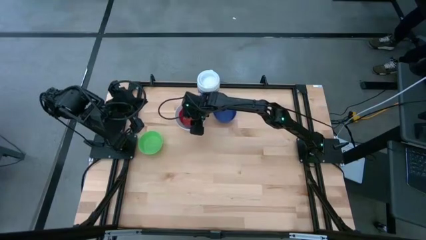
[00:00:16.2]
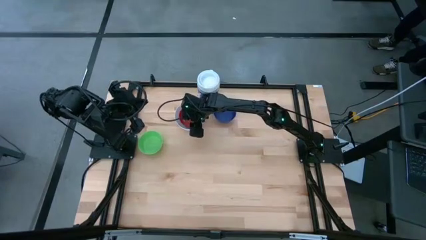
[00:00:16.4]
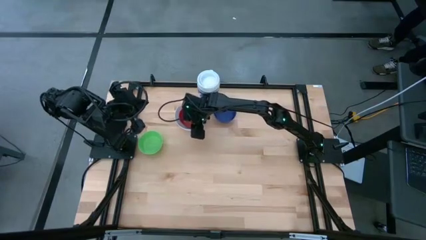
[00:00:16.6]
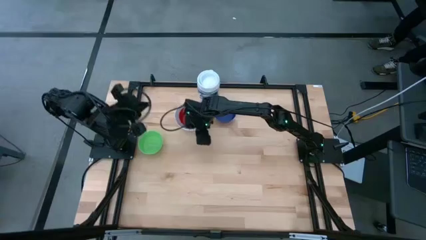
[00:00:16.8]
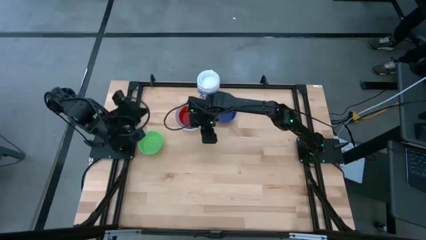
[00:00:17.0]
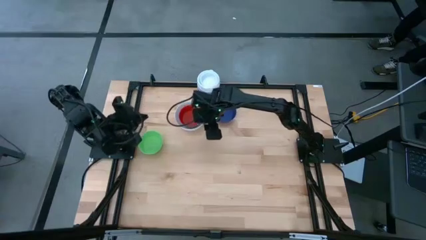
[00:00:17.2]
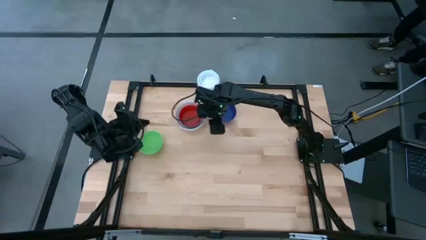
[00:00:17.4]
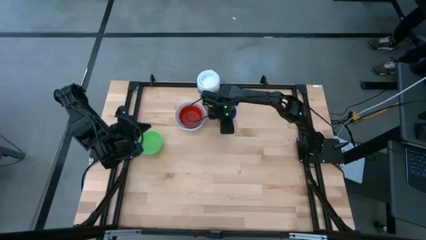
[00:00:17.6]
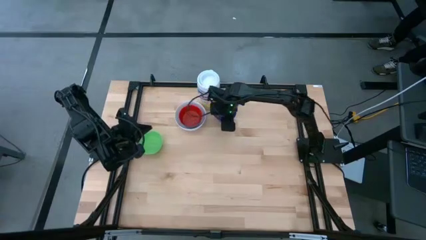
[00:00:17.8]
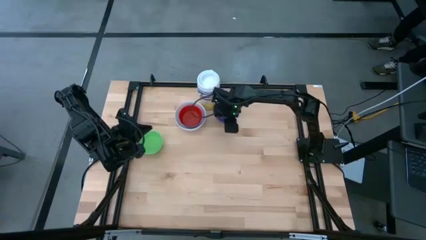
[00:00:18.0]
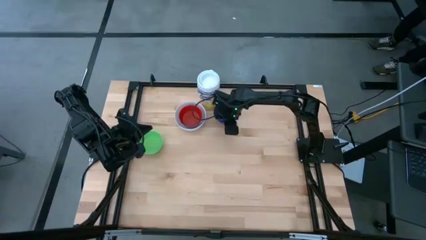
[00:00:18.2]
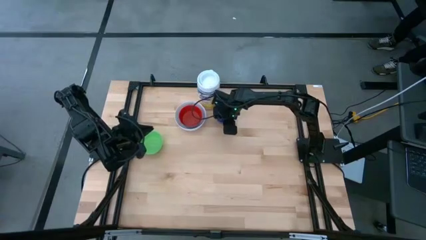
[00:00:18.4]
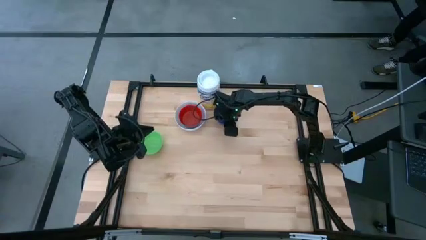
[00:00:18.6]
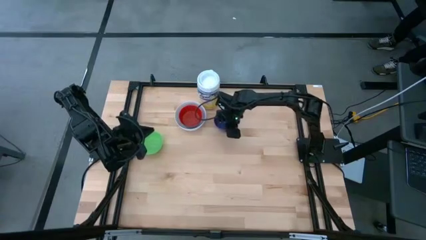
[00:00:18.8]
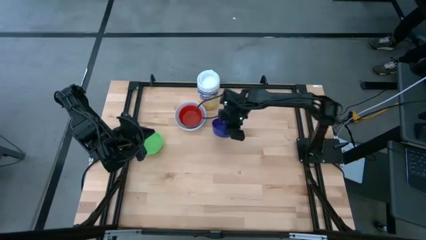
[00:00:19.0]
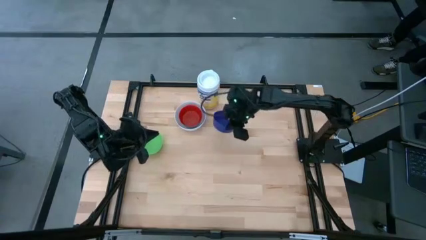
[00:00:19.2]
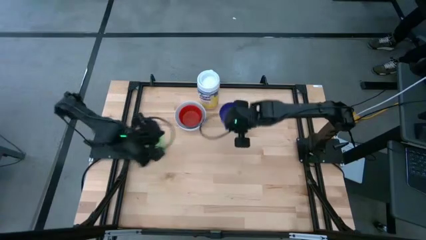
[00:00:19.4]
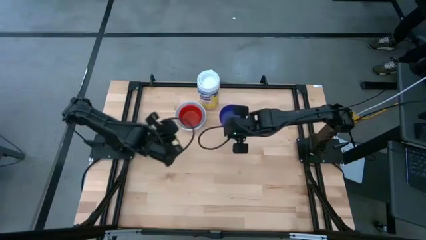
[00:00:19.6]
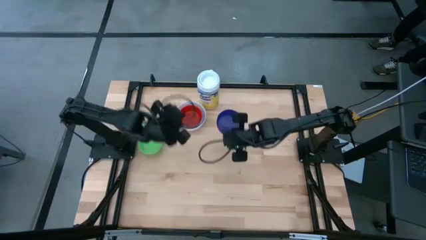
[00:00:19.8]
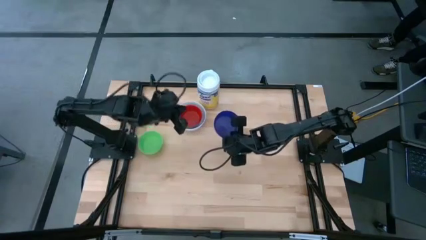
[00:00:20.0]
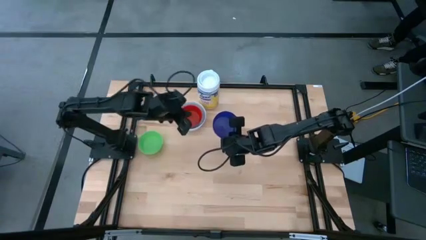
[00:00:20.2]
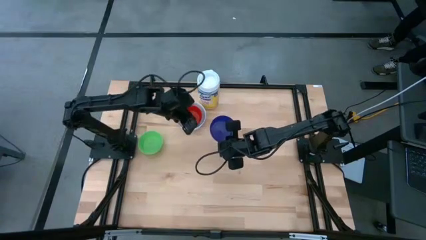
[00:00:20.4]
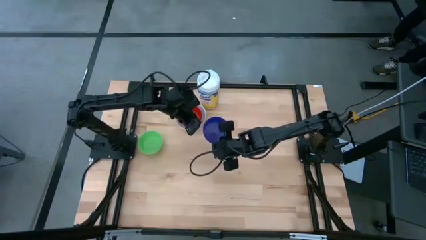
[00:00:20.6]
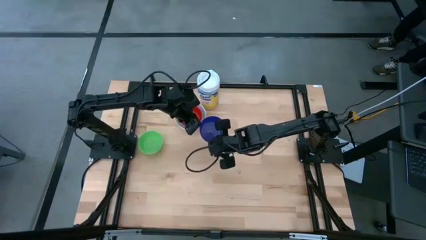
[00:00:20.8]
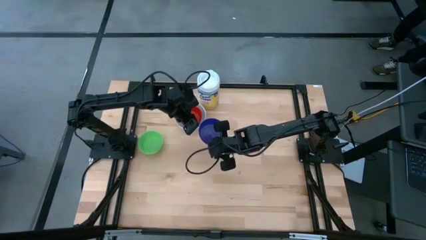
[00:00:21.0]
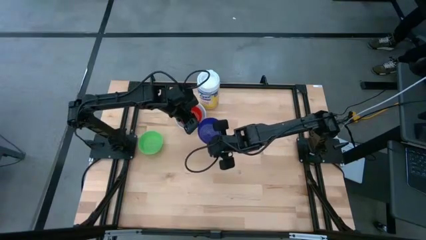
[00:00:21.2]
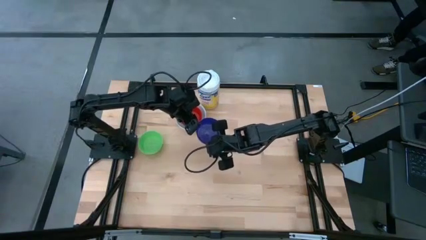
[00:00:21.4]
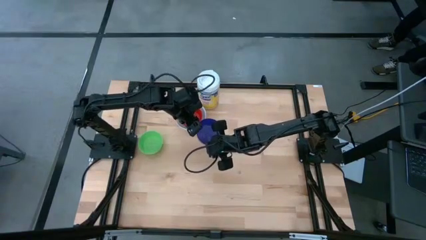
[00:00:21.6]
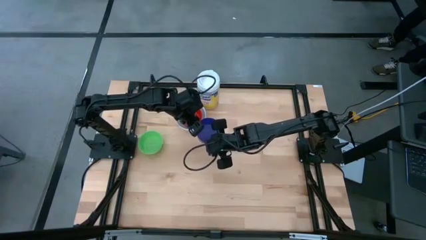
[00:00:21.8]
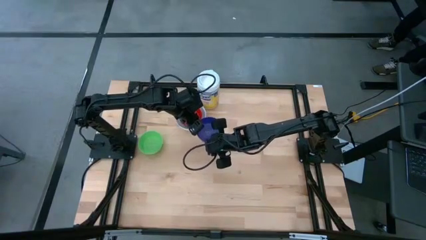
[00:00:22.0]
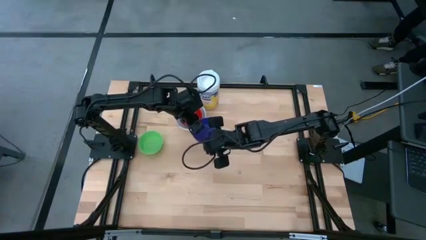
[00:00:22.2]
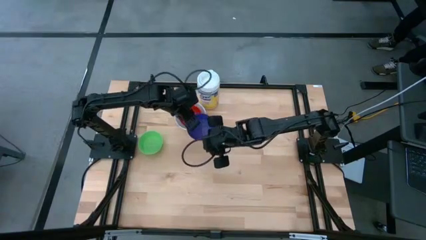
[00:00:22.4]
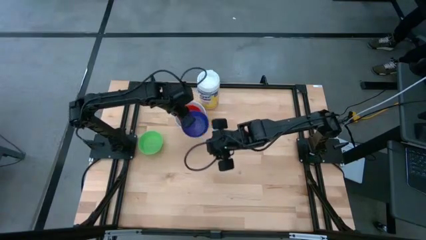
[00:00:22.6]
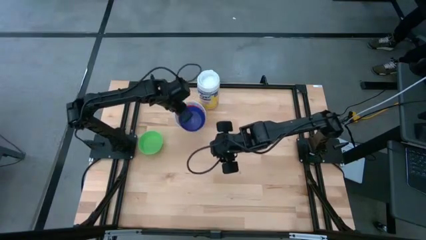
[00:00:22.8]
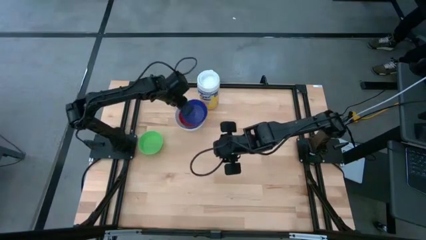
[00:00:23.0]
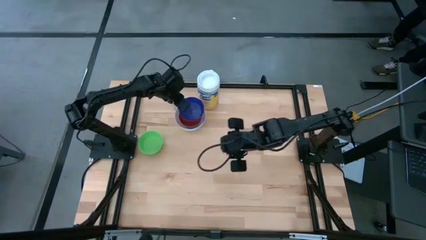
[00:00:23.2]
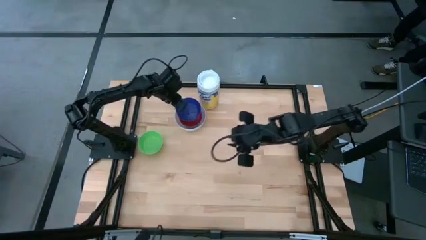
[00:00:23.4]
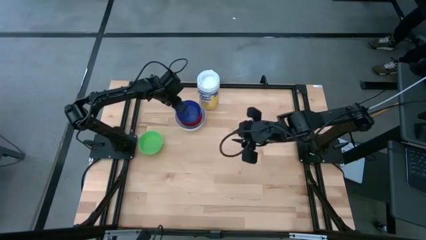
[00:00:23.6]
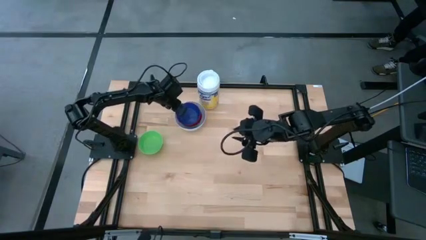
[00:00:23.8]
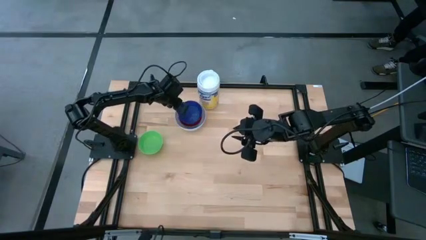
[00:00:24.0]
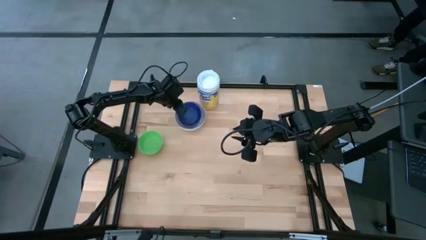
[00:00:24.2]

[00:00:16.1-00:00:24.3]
Stack the dark blue bowl on top of the red bowl

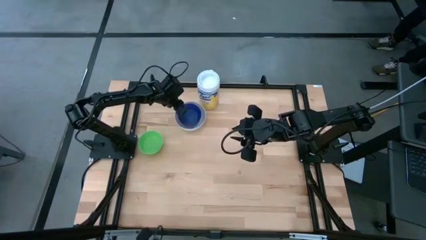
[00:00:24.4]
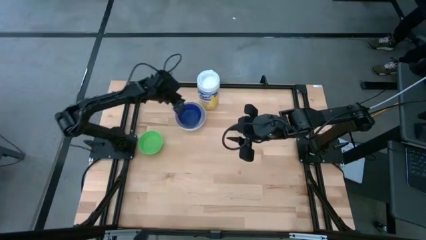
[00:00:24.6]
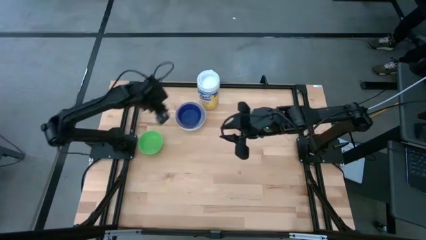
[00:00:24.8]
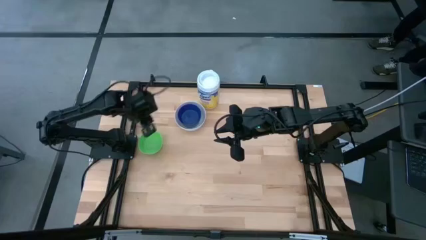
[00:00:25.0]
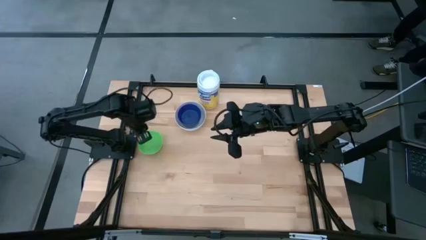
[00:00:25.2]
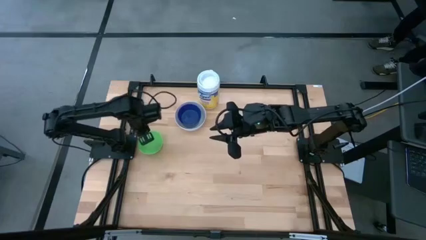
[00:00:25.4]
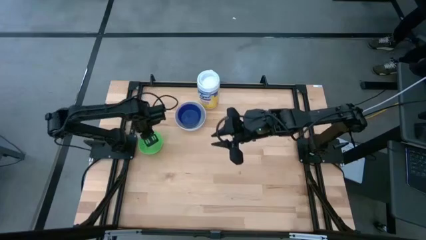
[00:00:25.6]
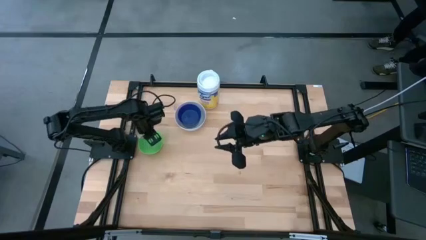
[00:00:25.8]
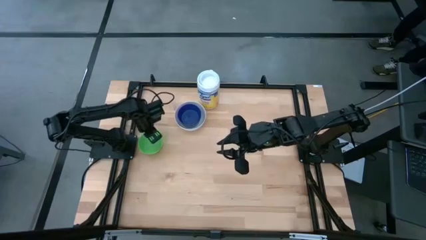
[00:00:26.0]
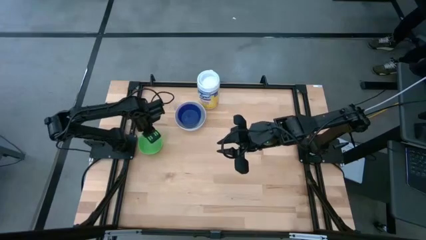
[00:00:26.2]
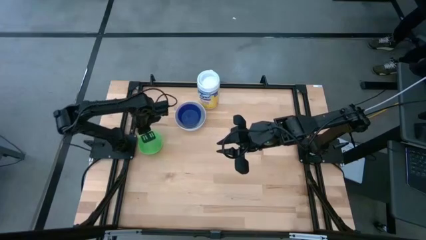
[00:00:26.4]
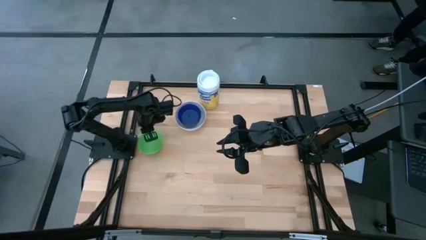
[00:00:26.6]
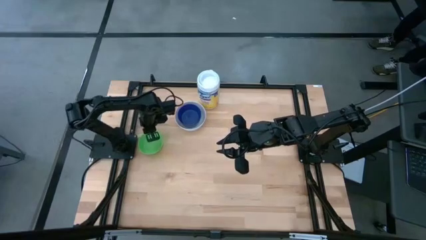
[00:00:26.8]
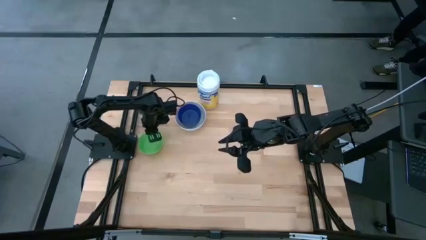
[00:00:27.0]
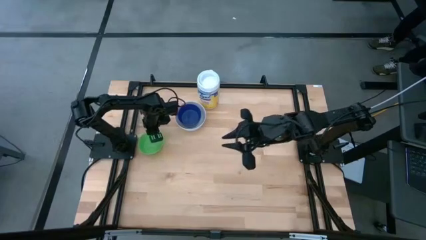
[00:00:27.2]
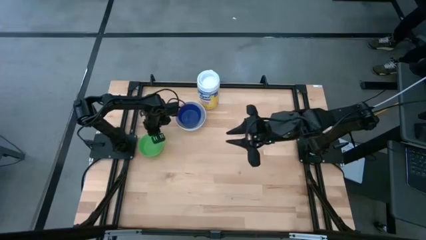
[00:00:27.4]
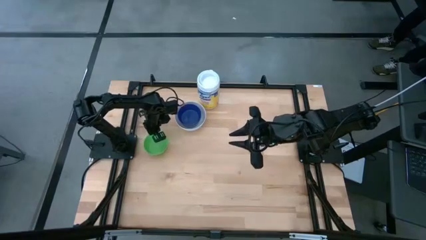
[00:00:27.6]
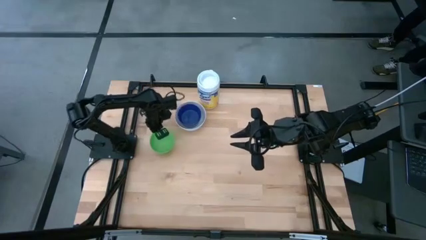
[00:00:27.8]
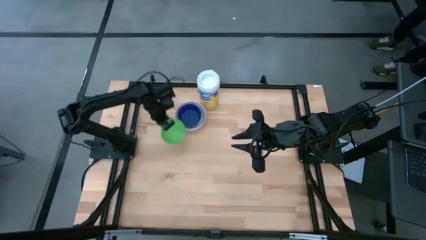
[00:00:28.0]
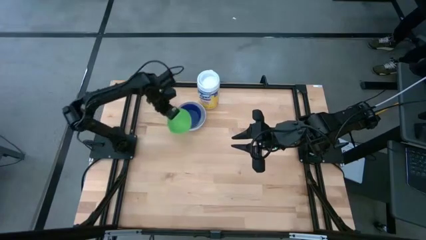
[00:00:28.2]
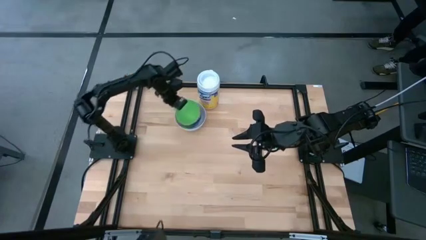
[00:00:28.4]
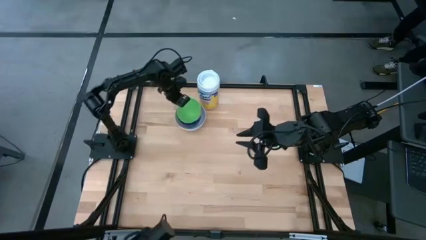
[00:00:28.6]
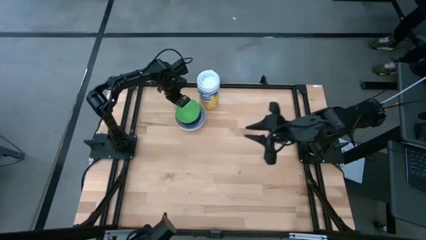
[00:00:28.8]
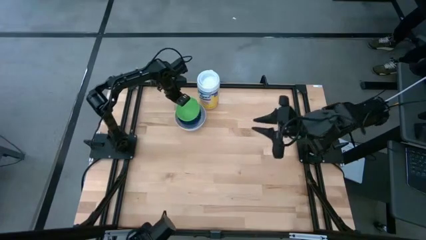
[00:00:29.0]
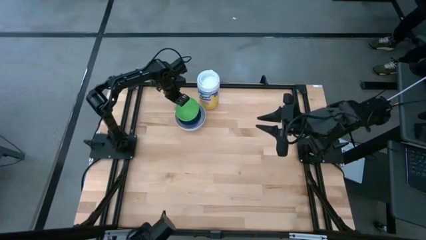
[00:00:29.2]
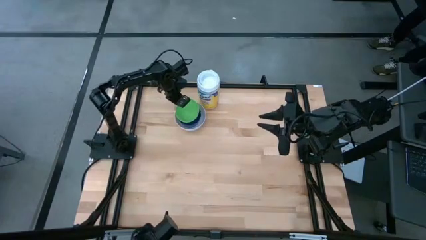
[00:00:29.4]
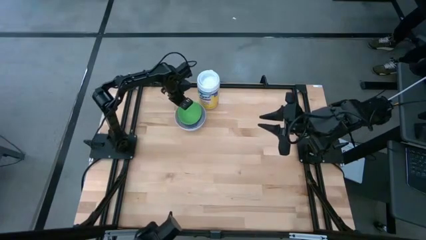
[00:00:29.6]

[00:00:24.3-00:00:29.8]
Stack the green bowl on top of the dark blue bowl

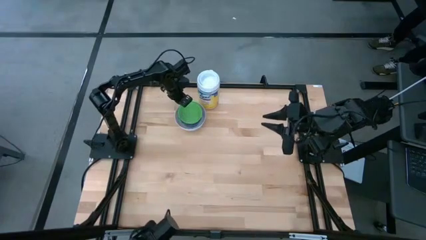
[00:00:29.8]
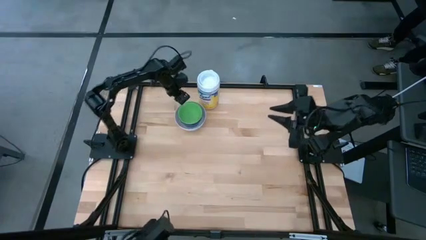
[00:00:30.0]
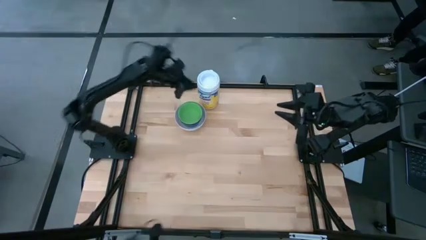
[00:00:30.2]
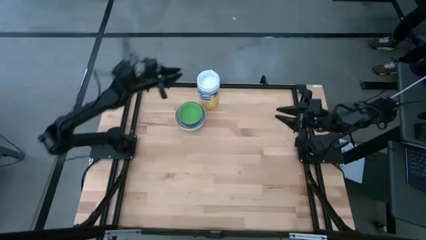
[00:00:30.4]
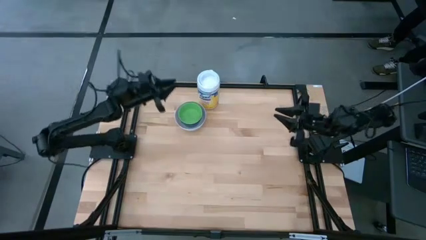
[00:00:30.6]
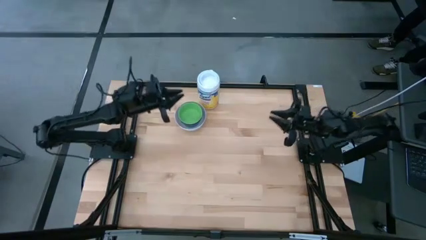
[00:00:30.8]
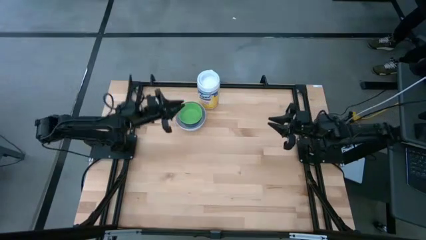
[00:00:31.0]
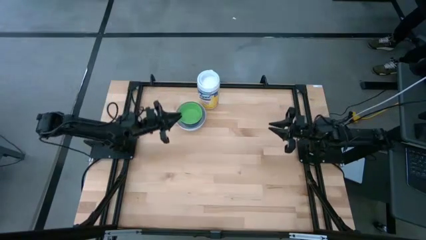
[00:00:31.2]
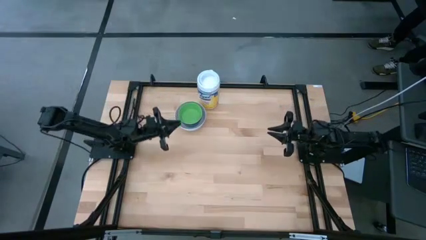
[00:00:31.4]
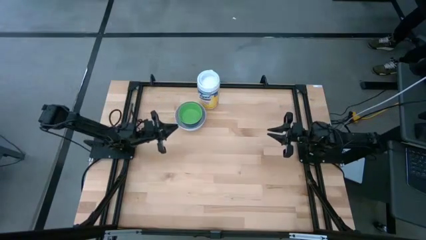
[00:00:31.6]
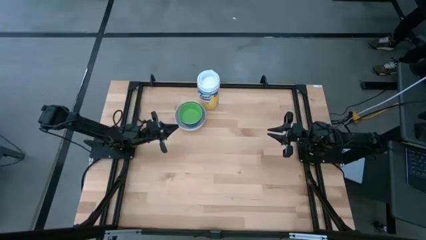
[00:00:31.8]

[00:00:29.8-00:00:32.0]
Return to Home Position
